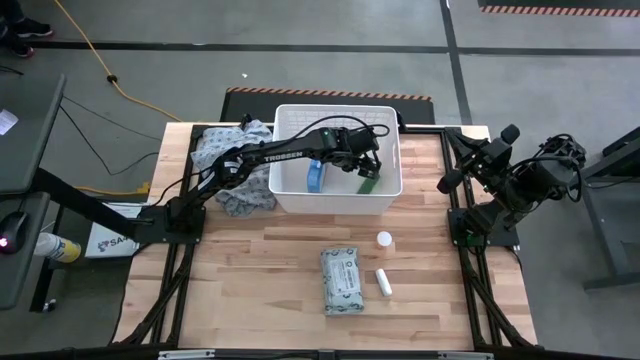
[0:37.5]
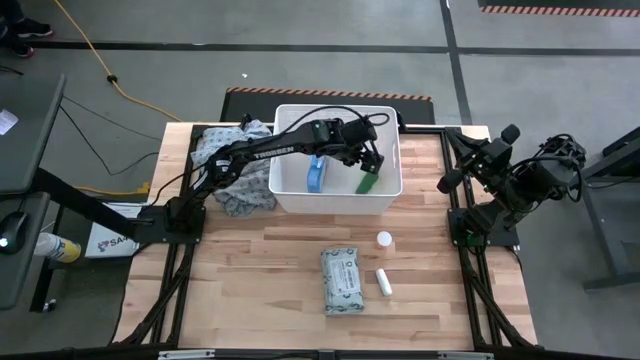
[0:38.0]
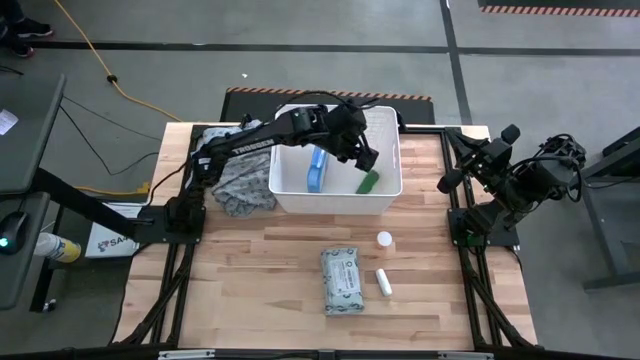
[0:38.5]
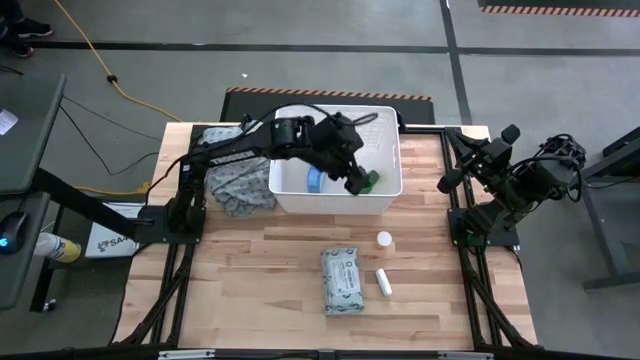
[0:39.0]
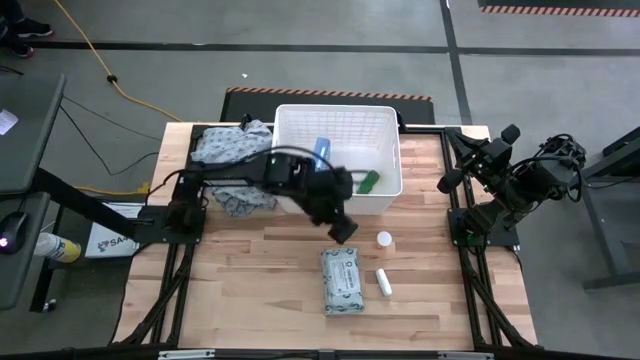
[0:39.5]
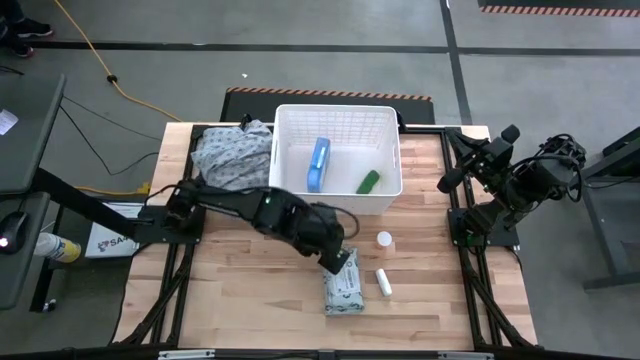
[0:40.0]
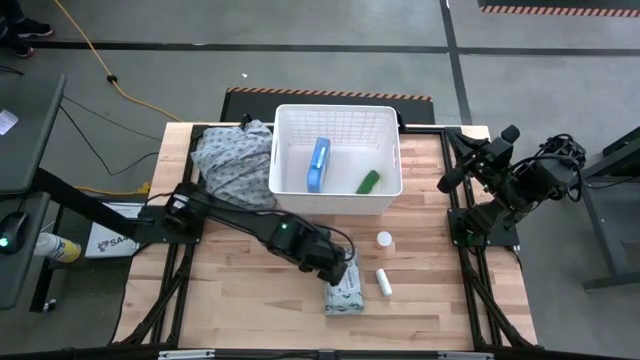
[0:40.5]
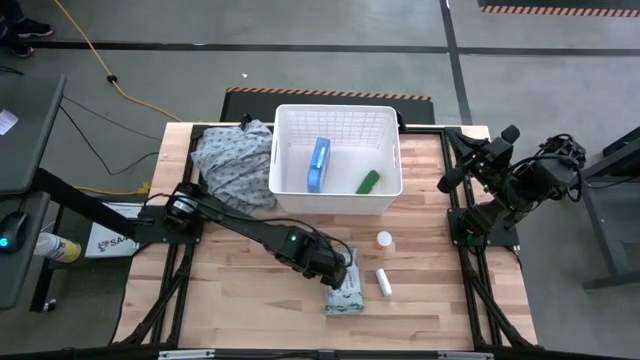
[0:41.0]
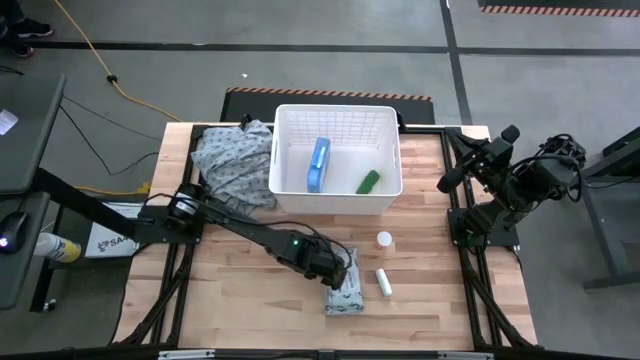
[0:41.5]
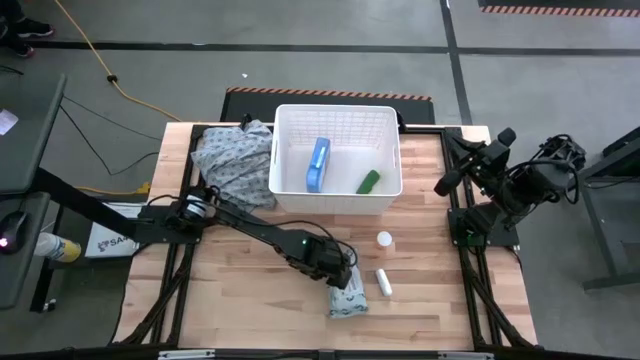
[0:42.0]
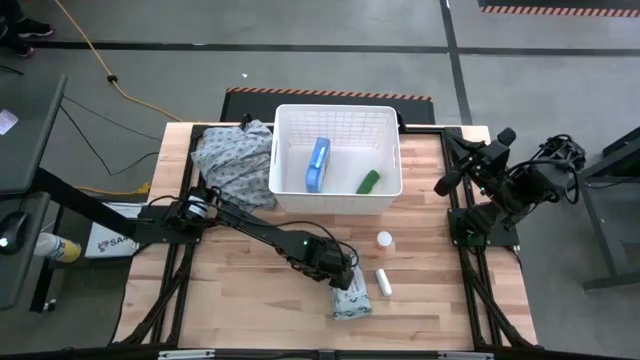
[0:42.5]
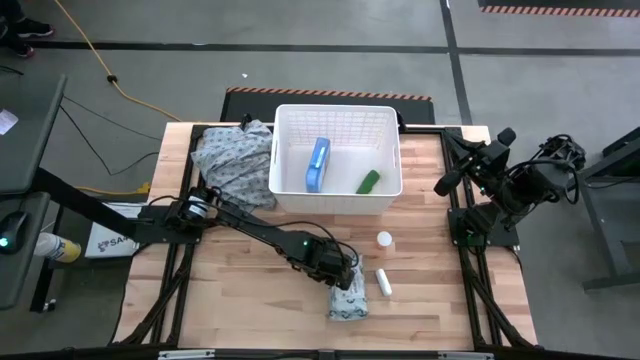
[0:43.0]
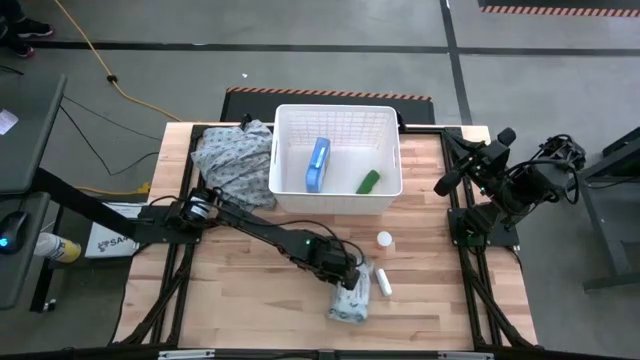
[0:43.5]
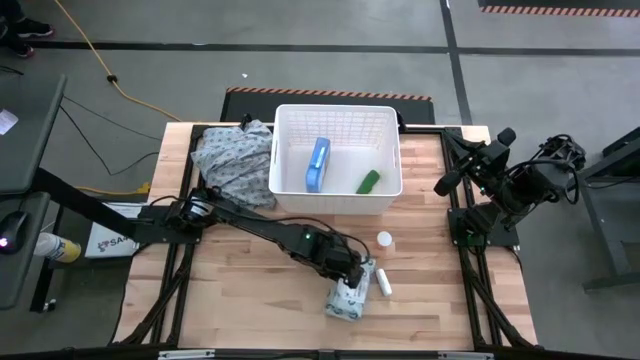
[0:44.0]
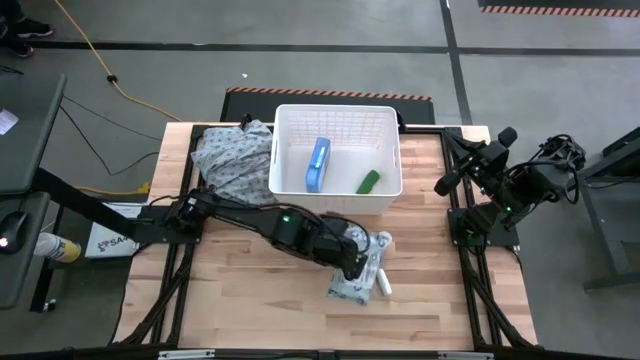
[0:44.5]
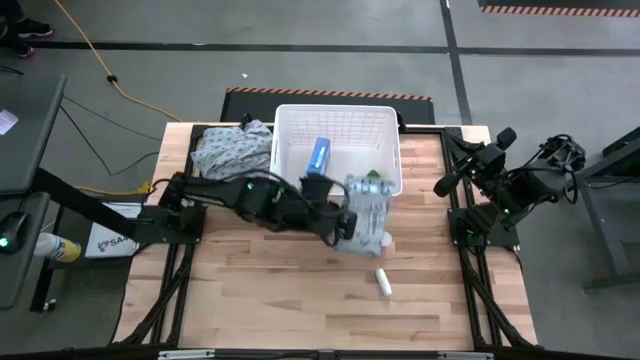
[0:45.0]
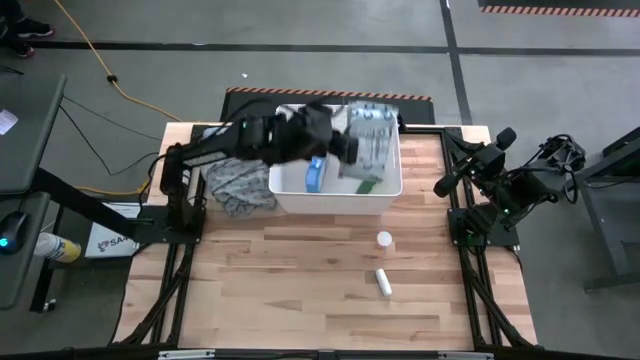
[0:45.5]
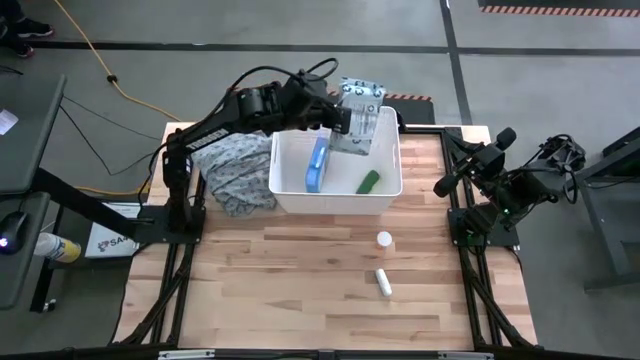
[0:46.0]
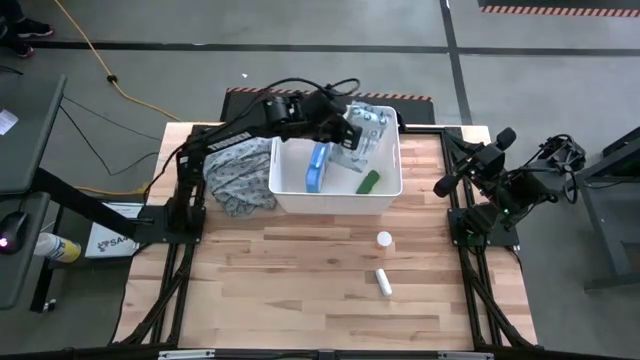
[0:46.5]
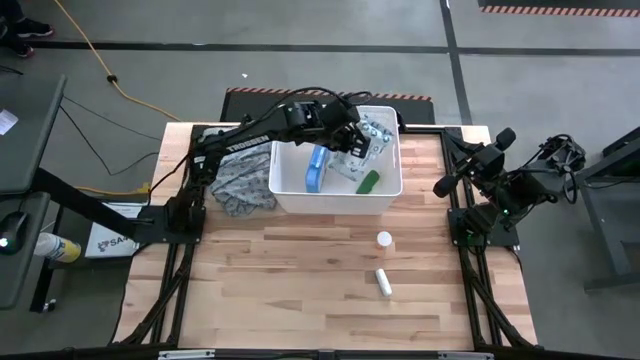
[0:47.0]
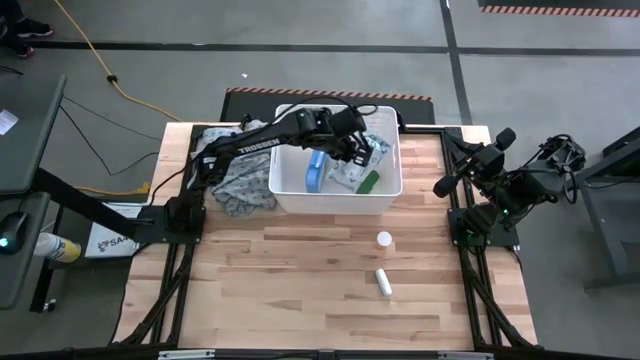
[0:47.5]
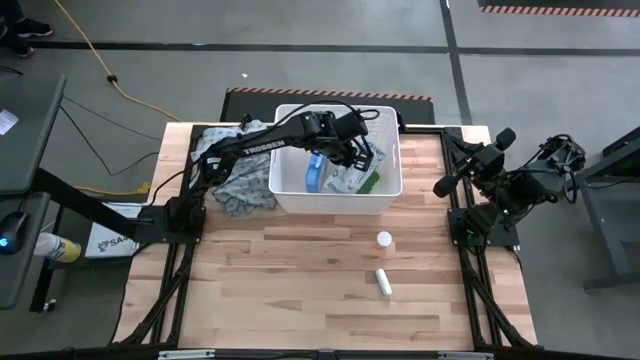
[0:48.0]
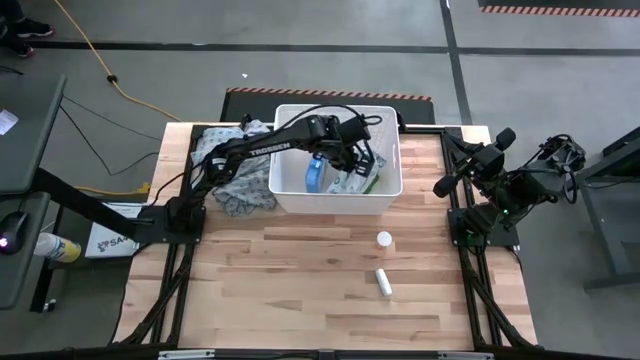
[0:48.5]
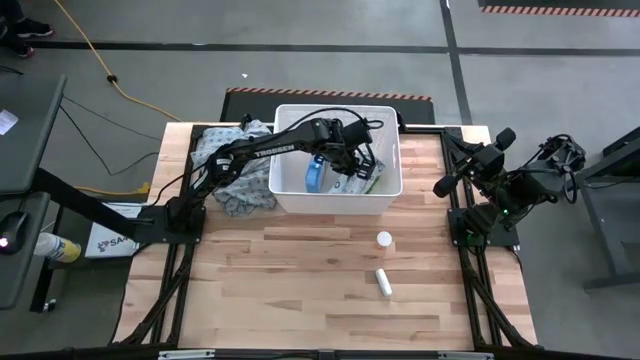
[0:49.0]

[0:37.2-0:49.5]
Task: Pick & place medical supplies in basket/bin
Put the white mailer bag into the white bin

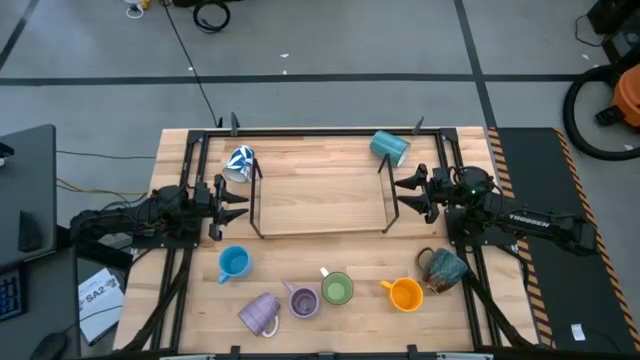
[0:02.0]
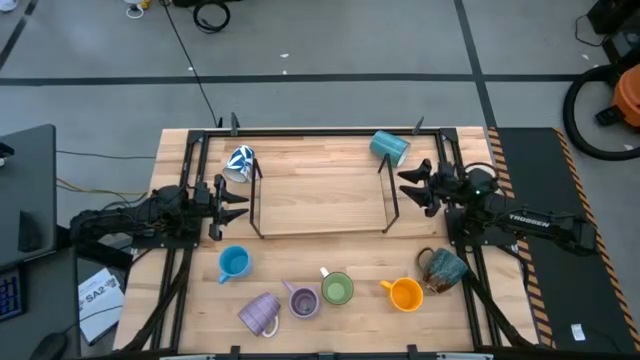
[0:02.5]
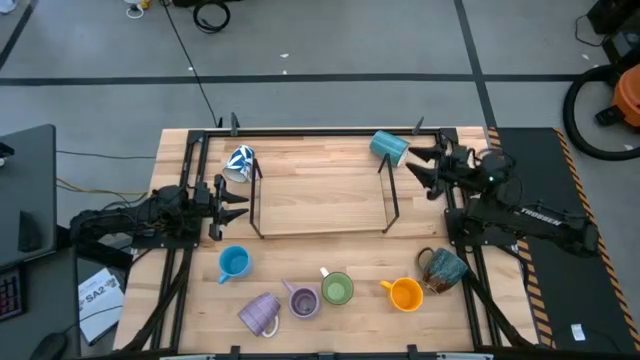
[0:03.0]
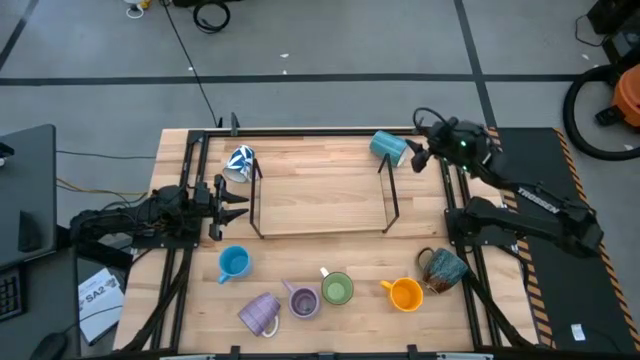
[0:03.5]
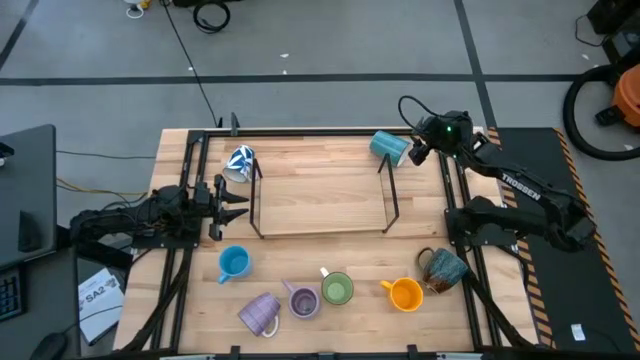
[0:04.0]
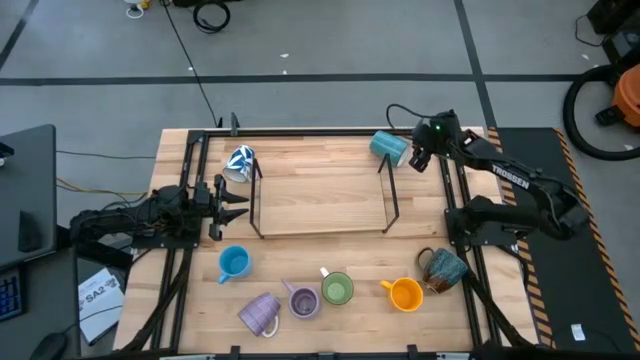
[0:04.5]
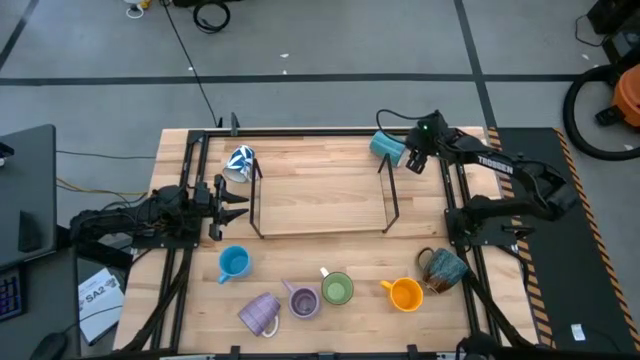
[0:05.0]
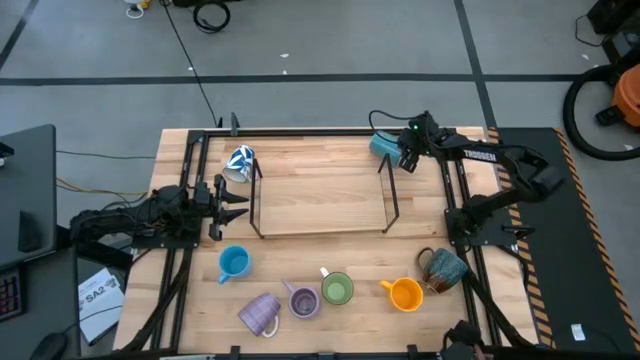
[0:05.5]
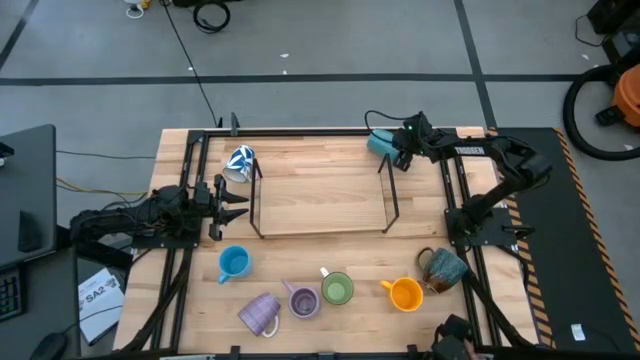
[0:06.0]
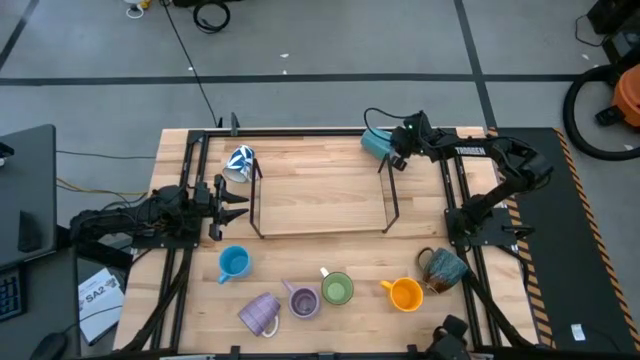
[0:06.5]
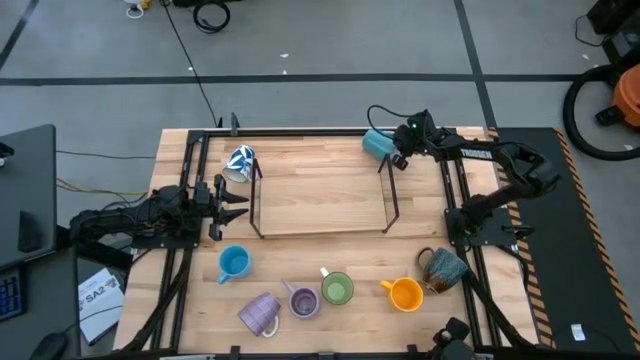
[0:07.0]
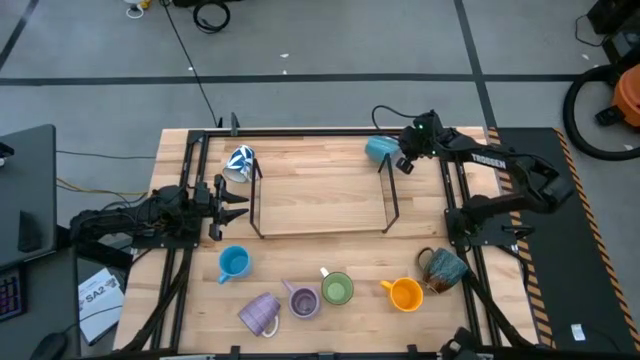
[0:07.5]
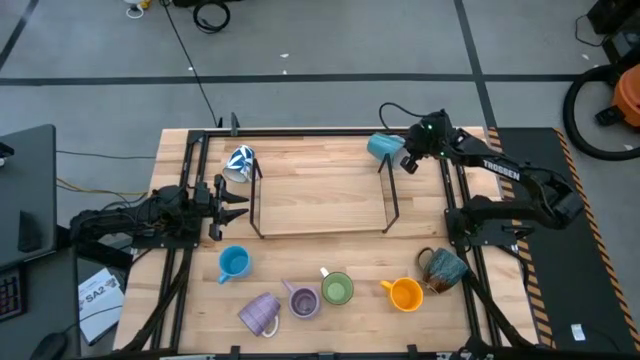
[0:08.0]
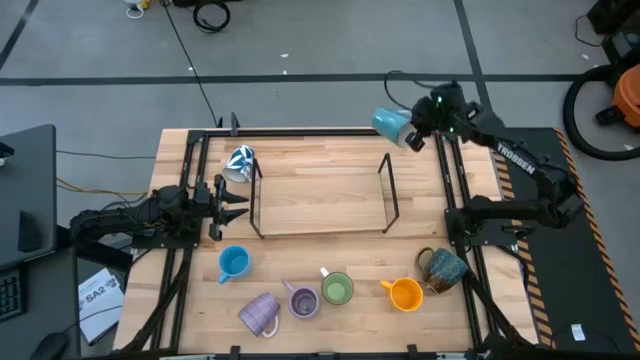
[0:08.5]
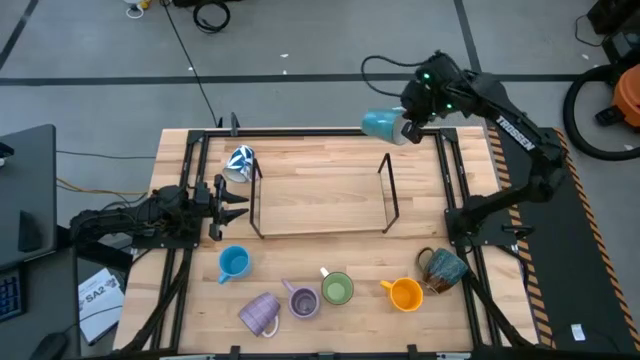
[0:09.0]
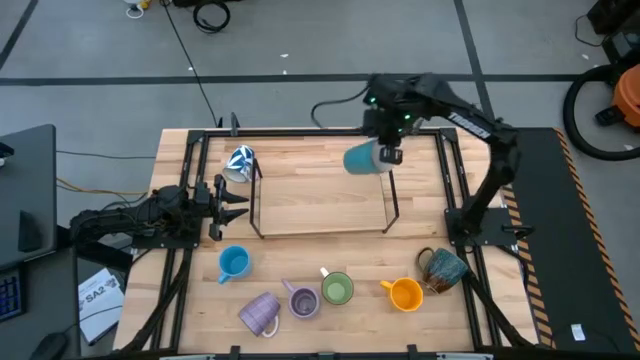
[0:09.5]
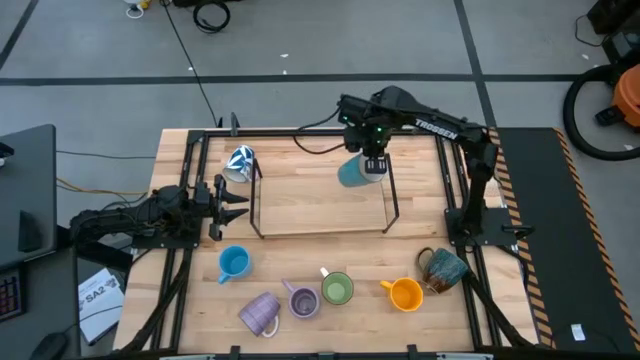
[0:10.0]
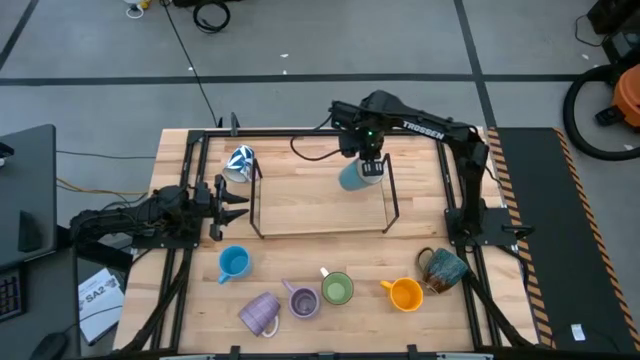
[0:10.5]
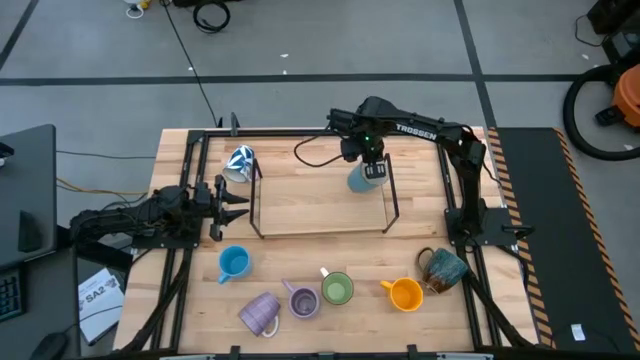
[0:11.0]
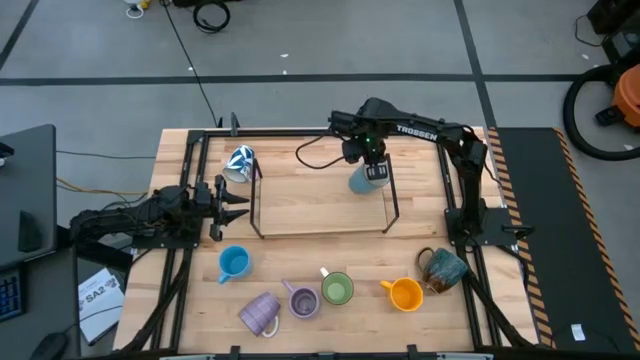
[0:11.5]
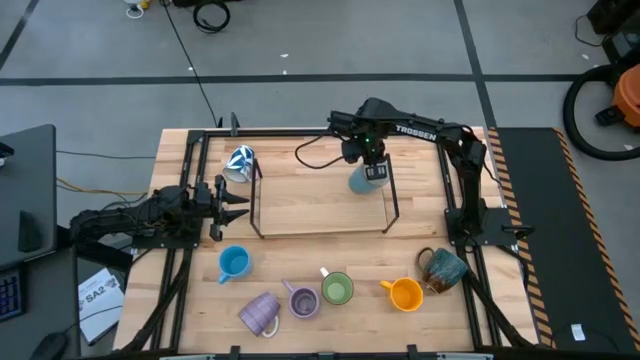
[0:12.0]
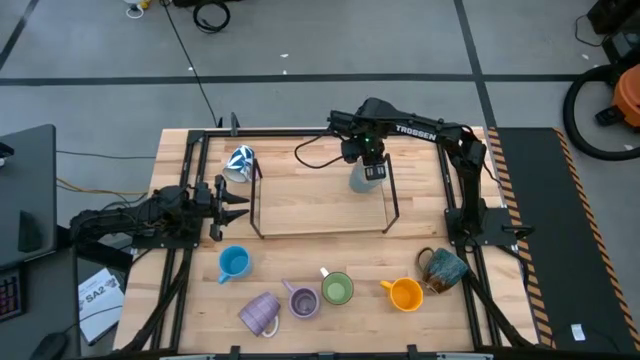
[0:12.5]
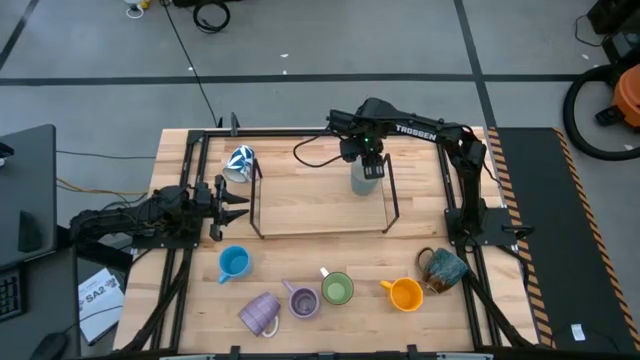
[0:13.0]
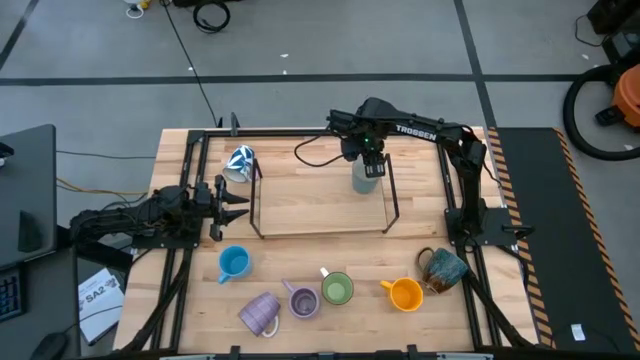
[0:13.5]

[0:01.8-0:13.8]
Task: Place coffee mugs
Put the light blue mug on the shelf
